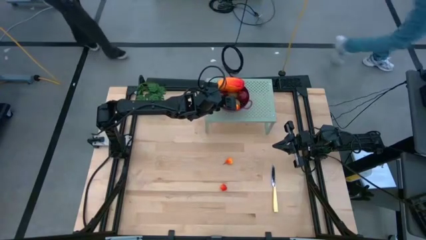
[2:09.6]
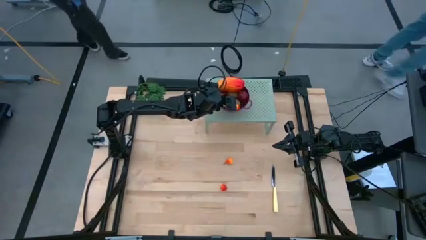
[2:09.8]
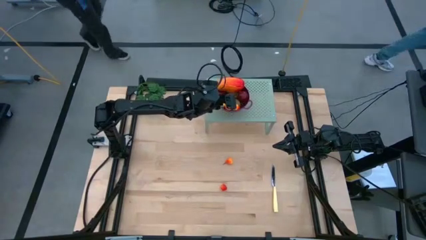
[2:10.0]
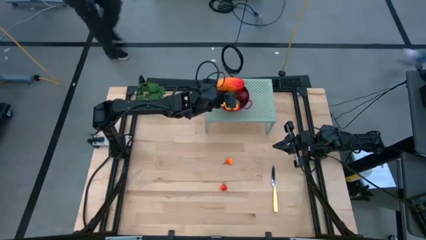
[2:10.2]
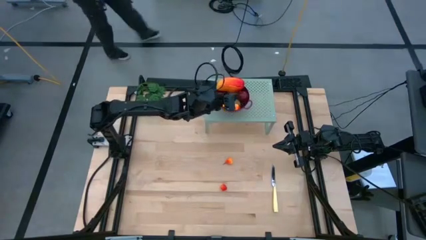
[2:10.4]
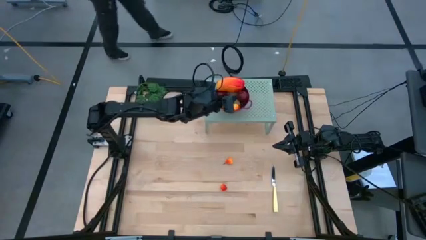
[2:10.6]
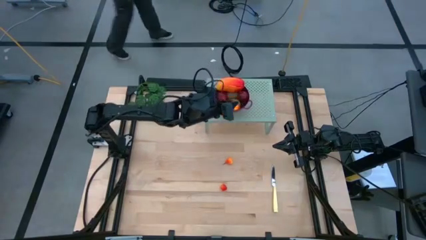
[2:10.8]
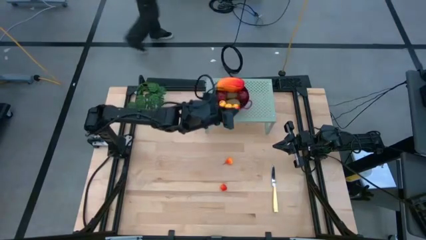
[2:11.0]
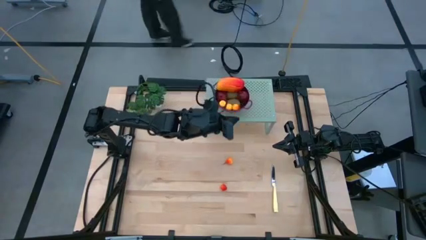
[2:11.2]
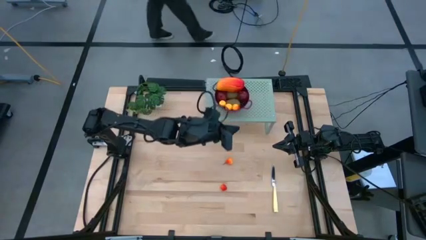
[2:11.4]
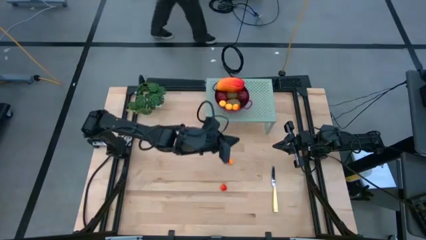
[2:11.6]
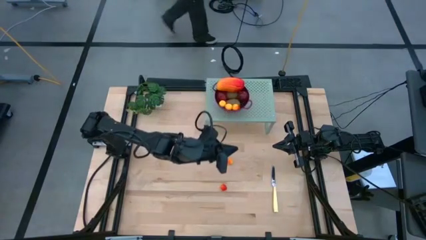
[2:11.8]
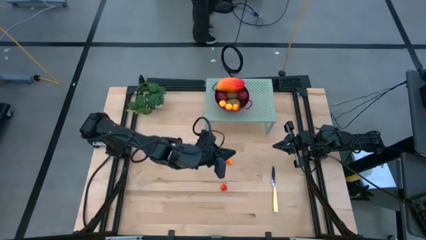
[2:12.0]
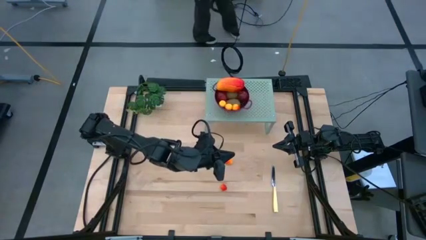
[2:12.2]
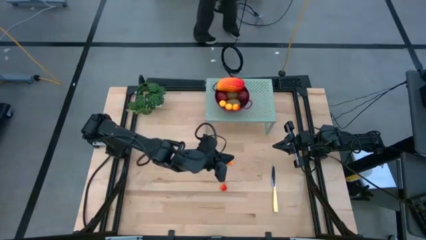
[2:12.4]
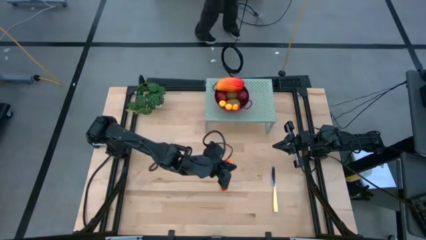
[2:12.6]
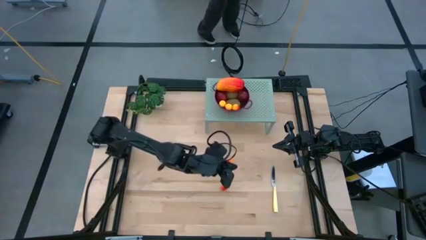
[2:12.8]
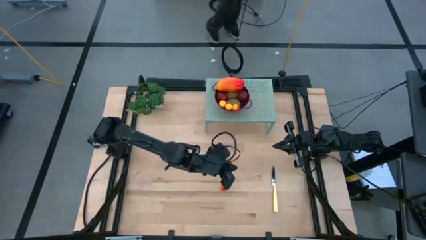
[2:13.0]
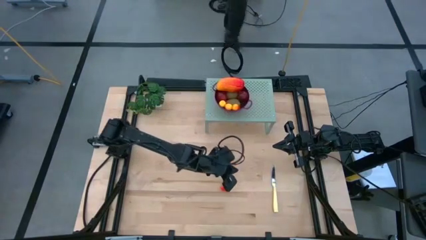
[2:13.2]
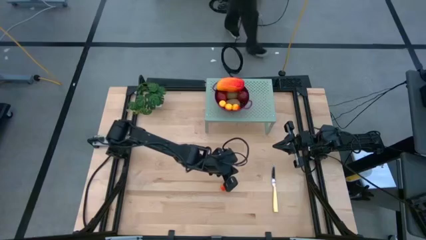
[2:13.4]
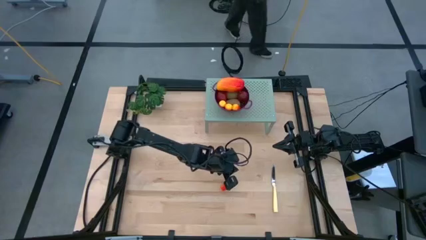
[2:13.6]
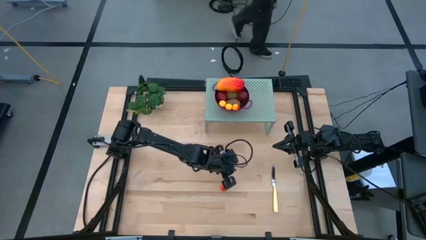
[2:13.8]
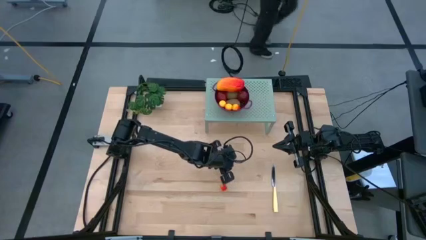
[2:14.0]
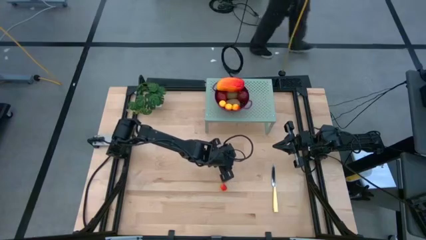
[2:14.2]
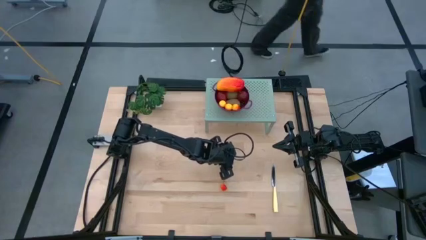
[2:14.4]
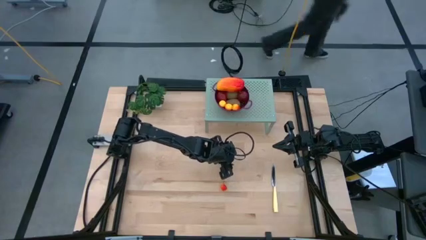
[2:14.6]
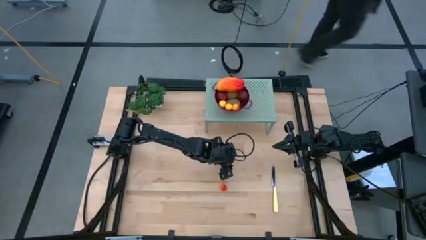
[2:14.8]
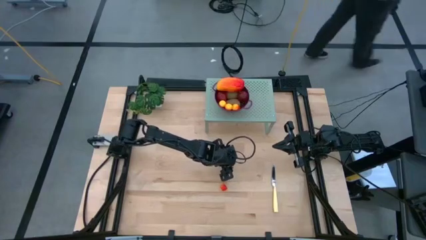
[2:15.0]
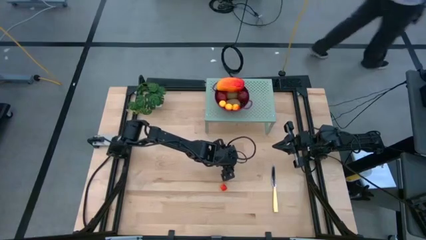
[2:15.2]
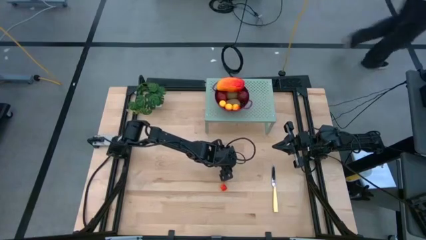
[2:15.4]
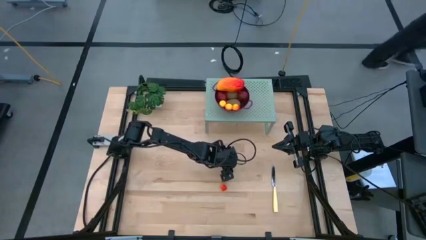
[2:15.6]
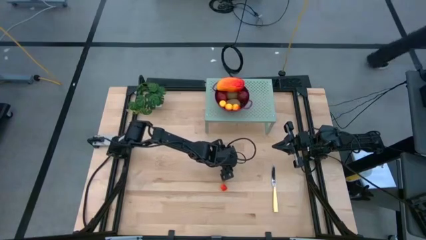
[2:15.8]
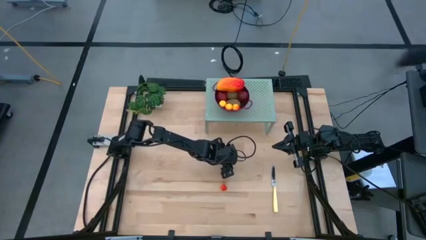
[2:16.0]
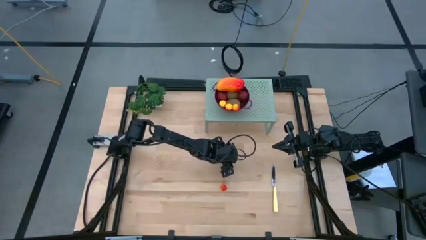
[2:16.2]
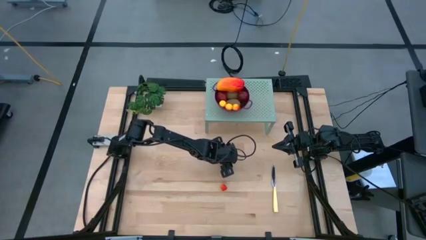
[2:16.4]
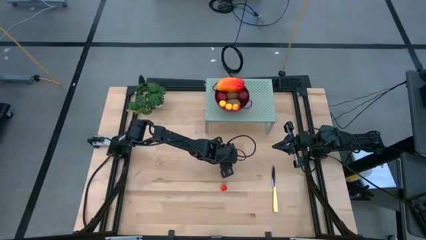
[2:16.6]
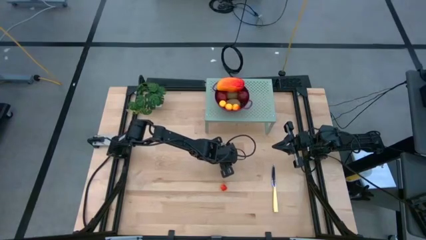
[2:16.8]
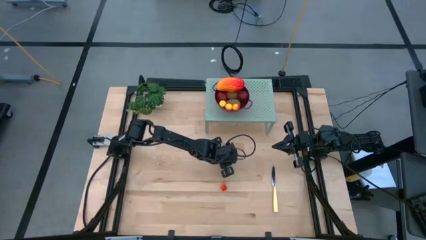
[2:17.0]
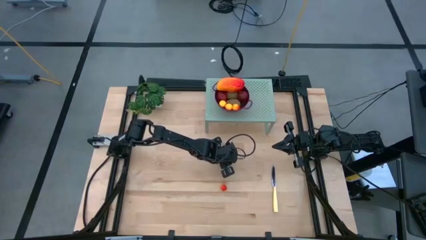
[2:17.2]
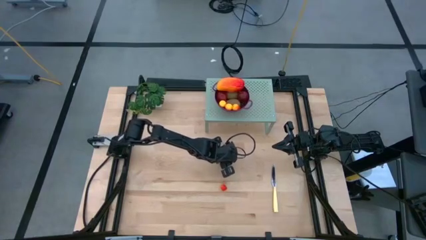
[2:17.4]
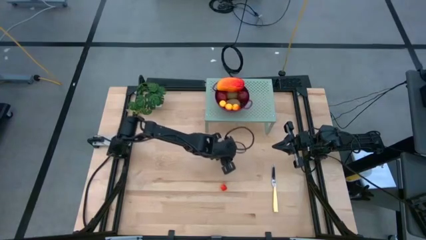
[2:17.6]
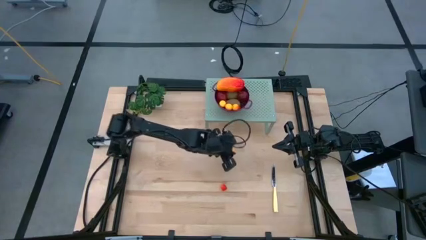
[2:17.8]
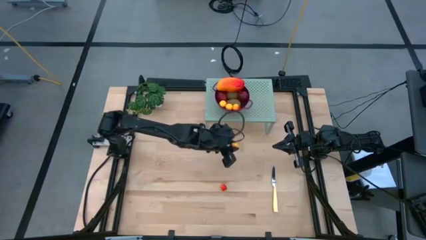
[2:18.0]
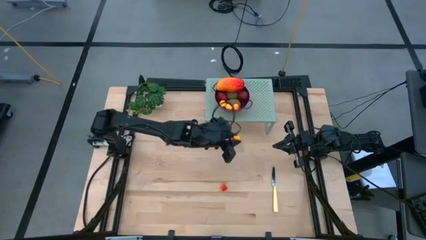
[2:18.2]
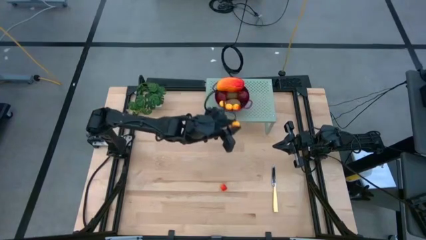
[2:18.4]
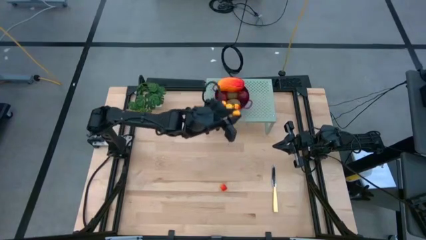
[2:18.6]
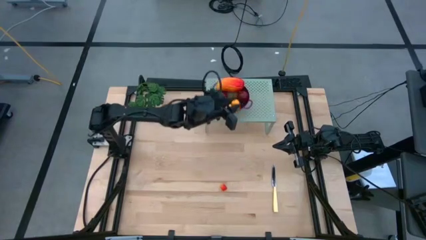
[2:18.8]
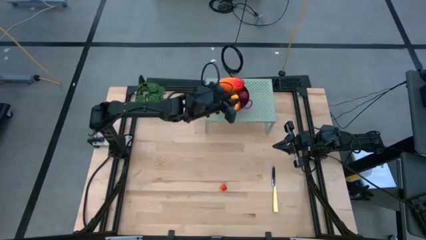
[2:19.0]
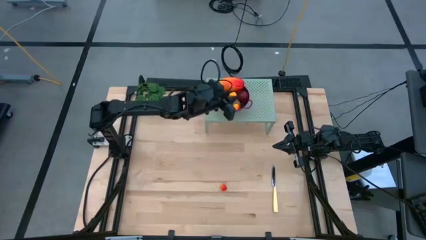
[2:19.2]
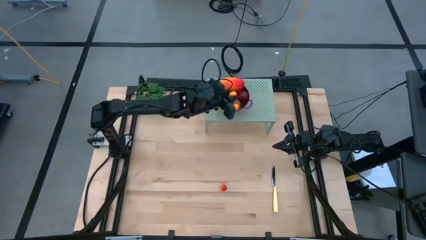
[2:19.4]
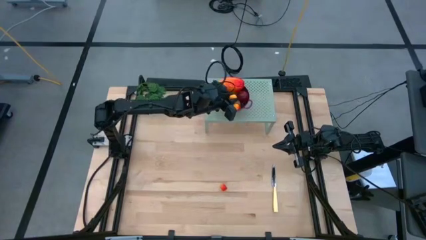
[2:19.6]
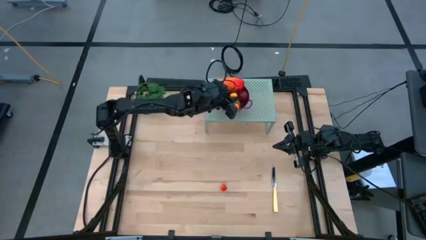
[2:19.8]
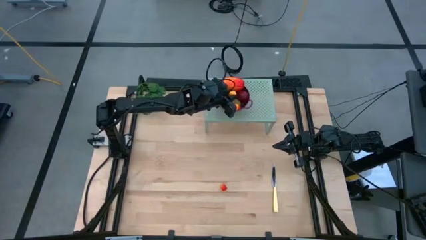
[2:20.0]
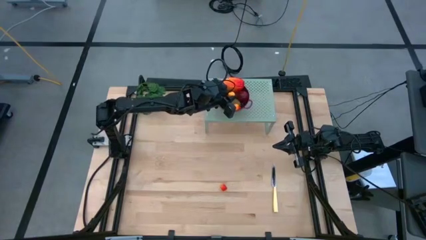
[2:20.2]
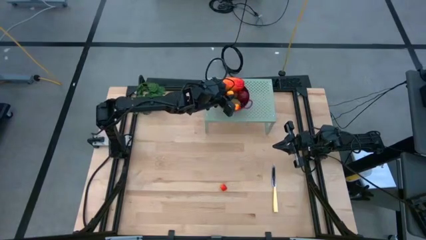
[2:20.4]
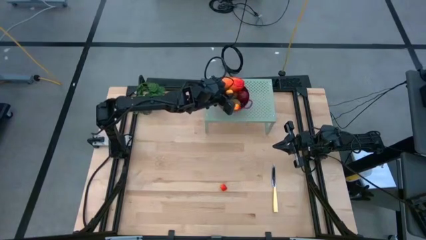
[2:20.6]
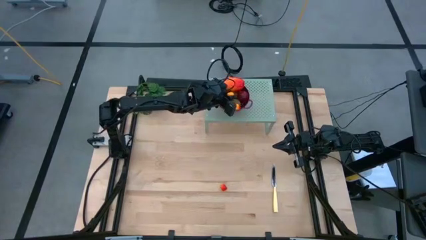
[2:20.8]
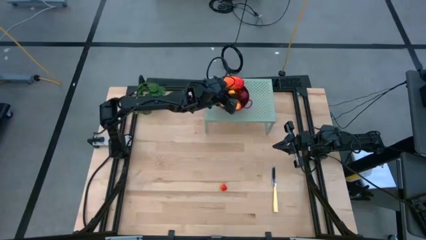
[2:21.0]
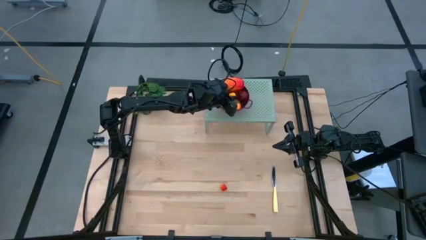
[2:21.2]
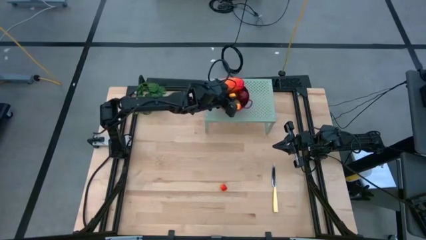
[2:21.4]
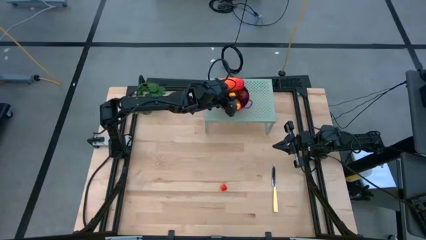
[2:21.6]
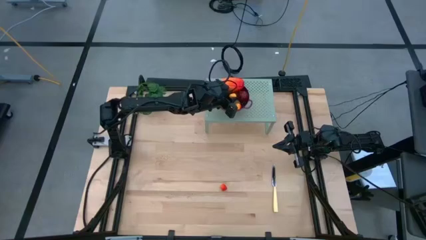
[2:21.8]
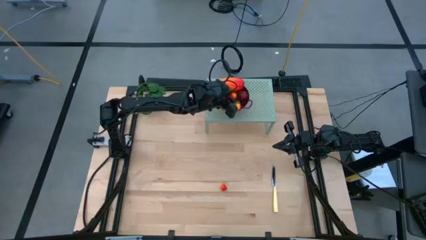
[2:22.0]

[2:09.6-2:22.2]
Task: Pick & Place Fruit
Put the pear into the strainer bowl on the shelf

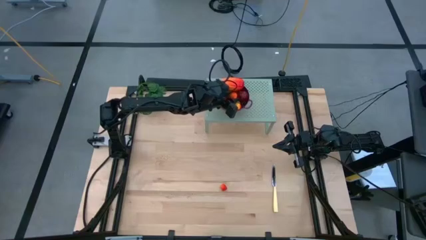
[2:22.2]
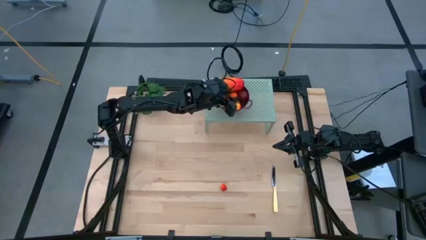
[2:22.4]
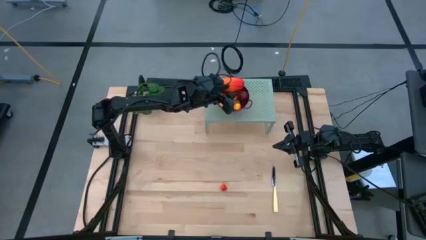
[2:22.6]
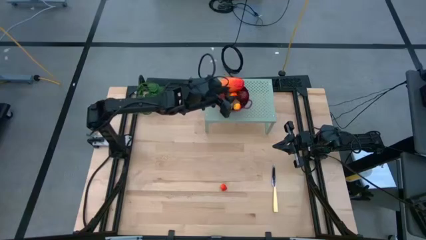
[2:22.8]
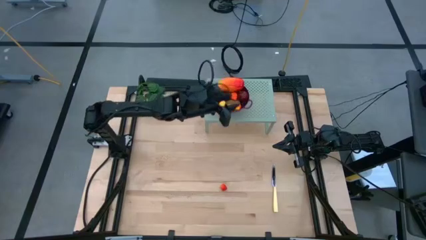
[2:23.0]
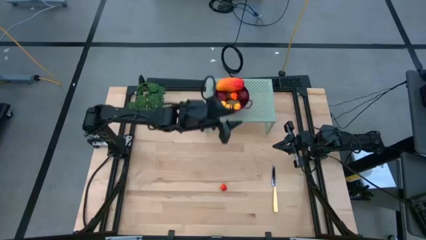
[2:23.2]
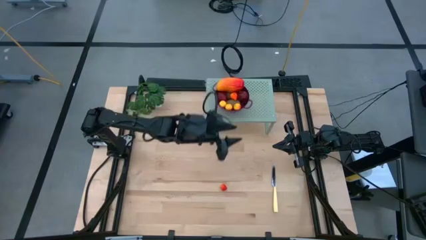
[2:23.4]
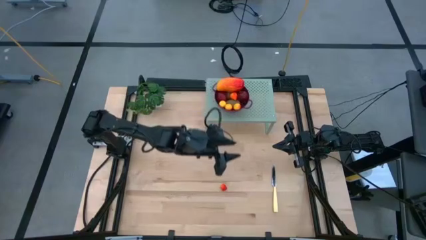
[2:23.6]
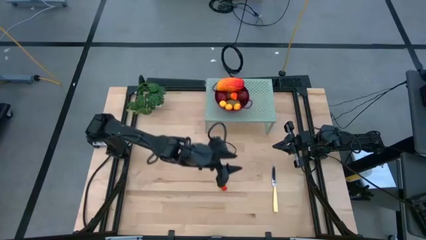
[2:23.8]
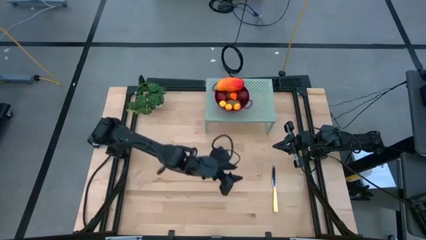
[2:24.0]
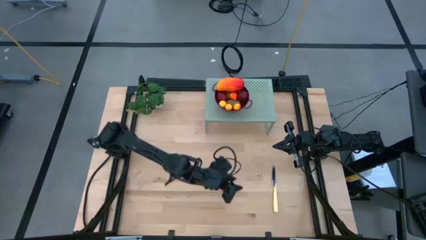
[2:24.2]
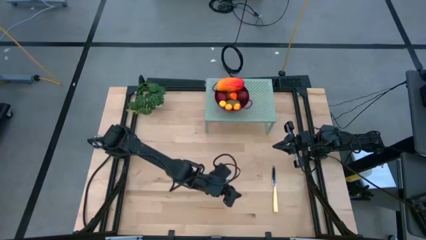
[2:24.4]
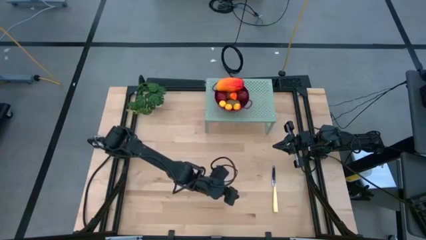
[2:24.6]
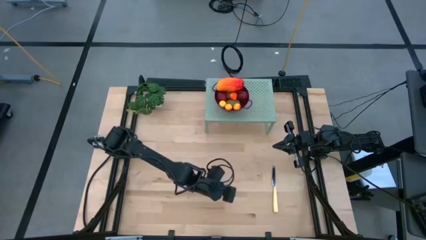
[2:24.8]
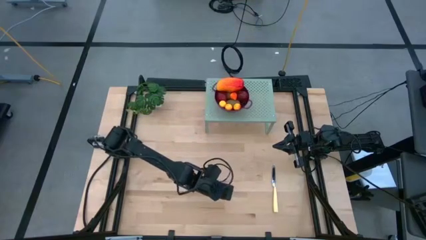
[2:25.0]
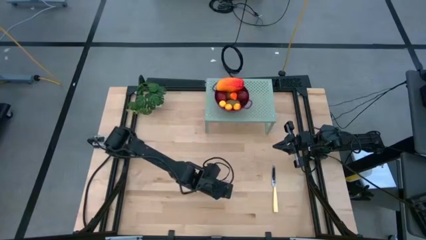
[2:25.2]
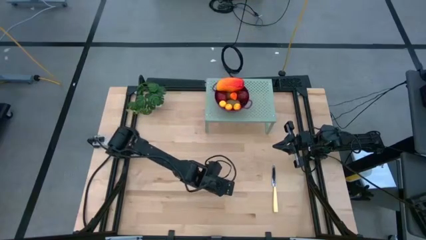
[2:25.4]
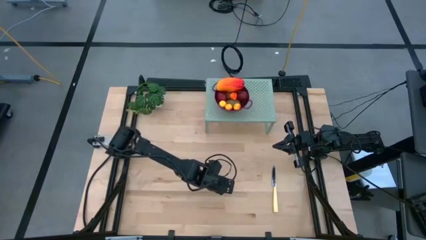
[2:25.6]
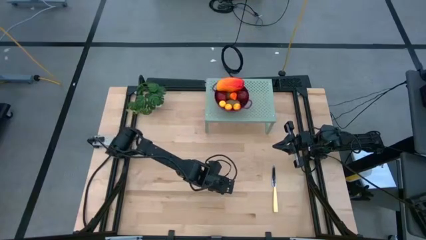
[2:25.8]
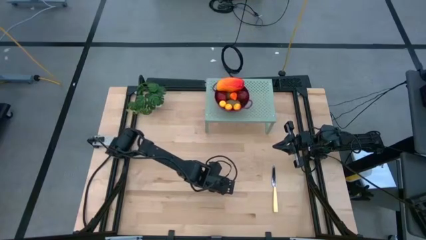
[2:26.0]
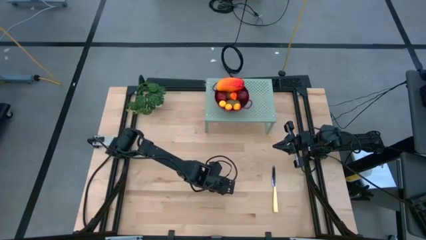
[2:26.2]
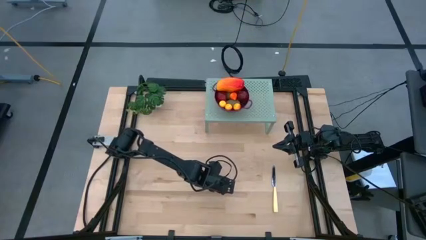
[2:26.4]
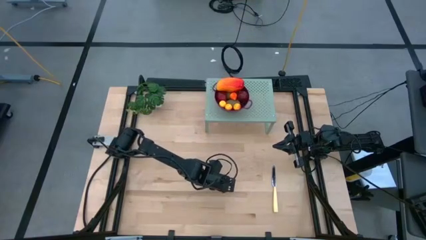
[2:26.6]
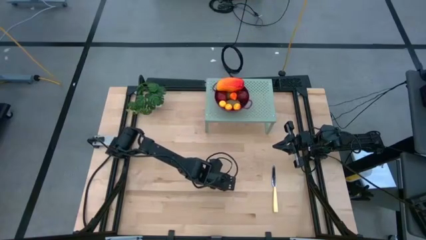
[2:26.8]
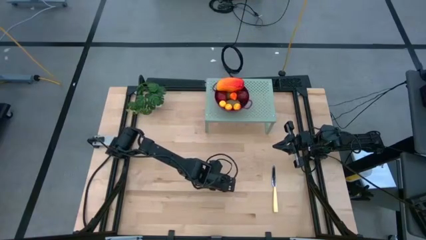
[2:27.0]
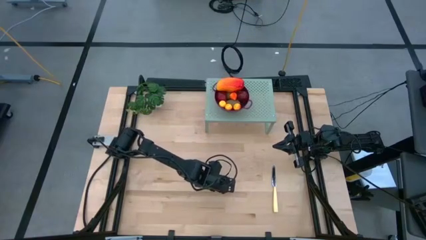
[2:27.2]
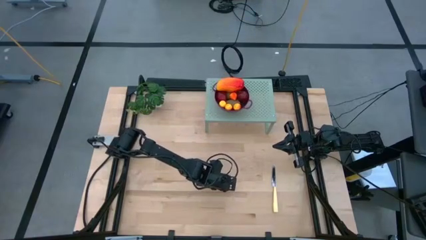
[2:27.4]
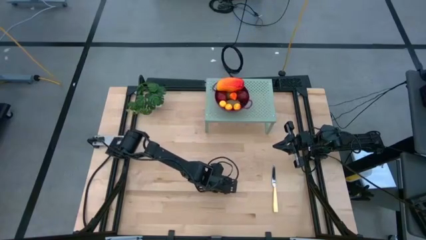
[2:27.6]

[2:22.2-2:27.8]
Put the peach into the strainer bowl on the shelf
